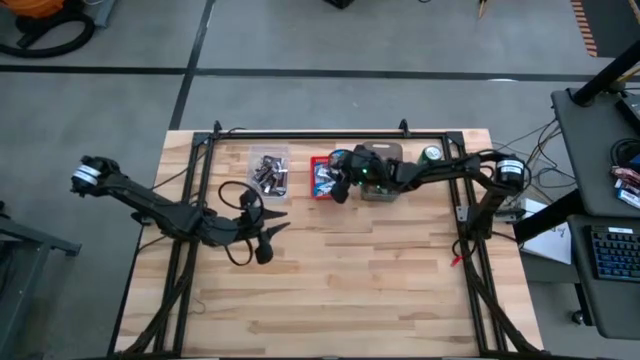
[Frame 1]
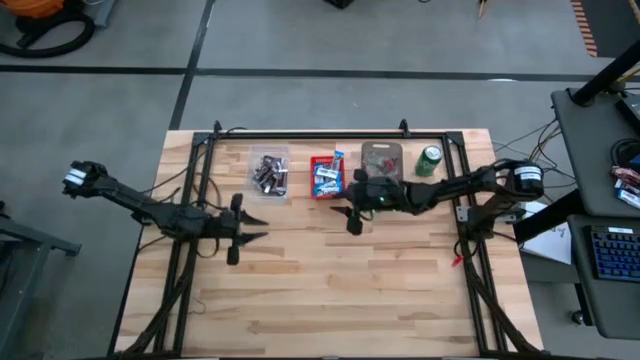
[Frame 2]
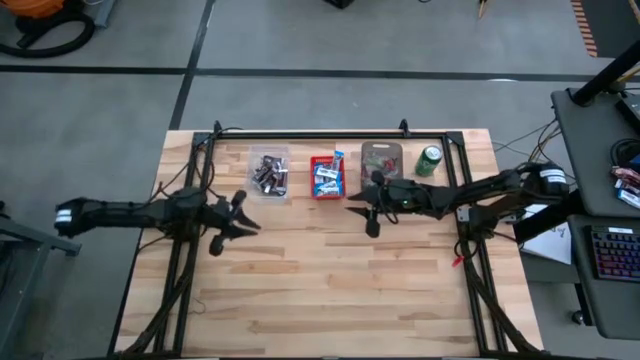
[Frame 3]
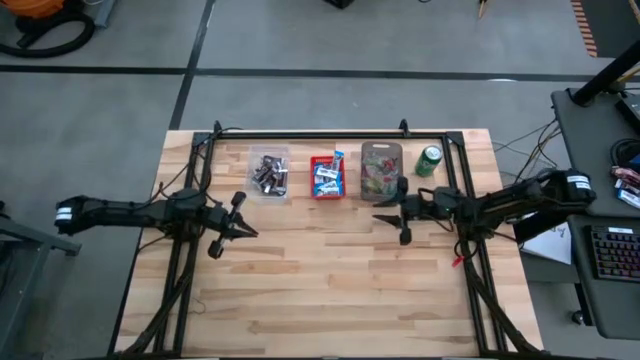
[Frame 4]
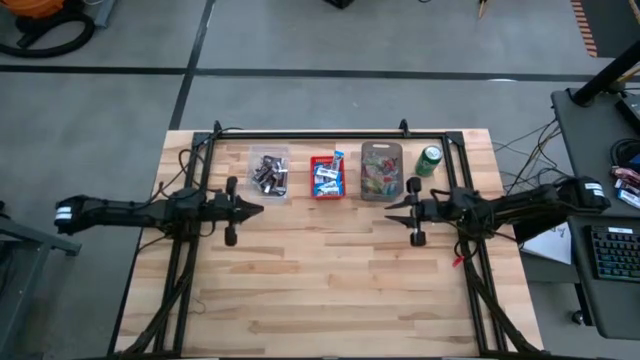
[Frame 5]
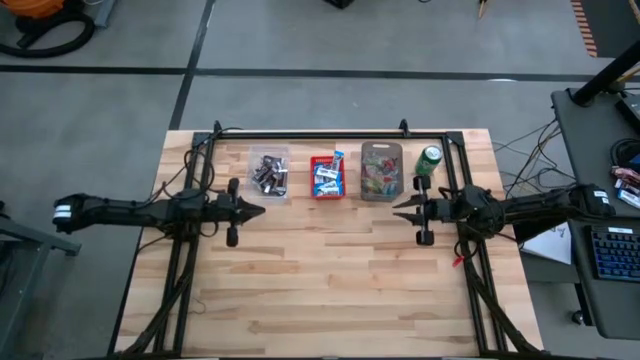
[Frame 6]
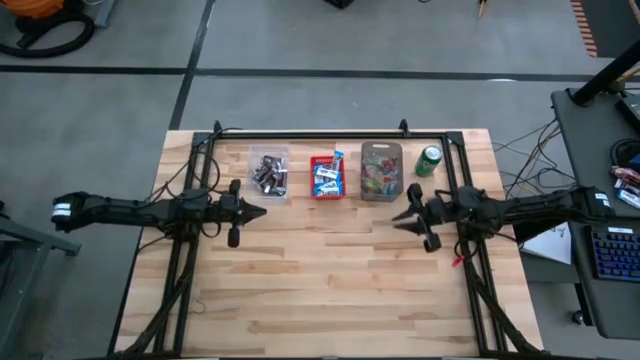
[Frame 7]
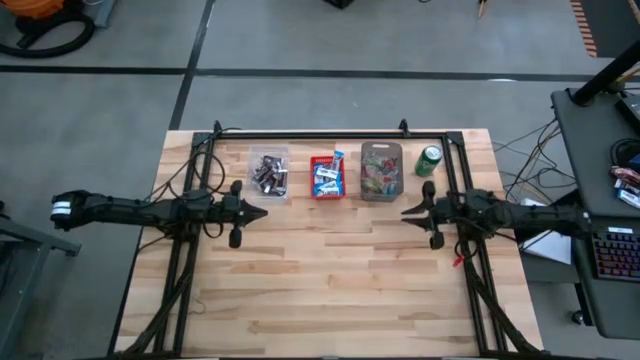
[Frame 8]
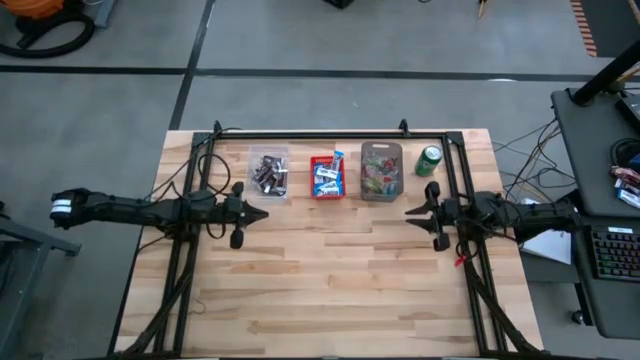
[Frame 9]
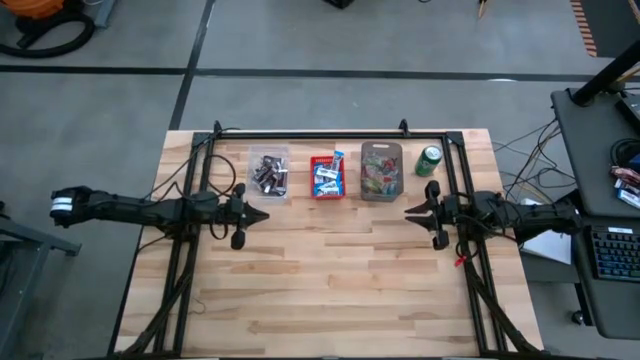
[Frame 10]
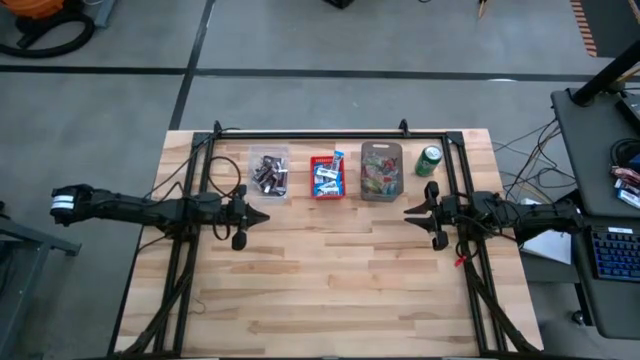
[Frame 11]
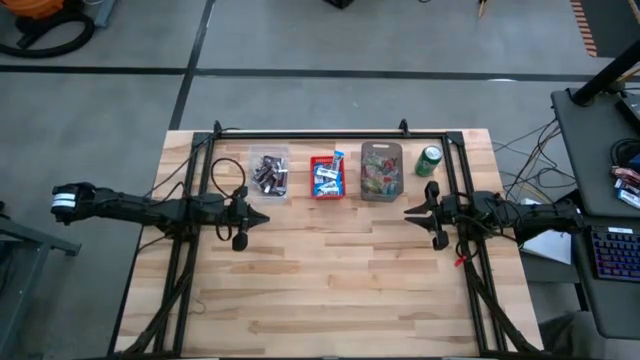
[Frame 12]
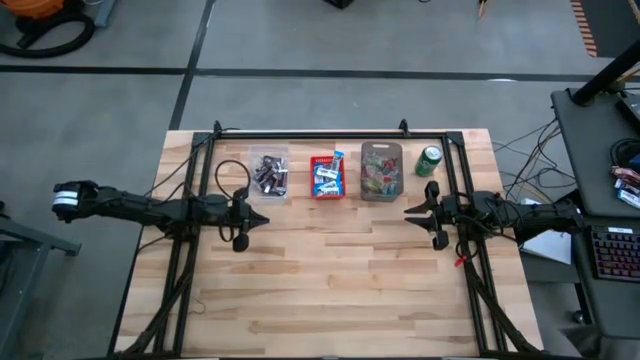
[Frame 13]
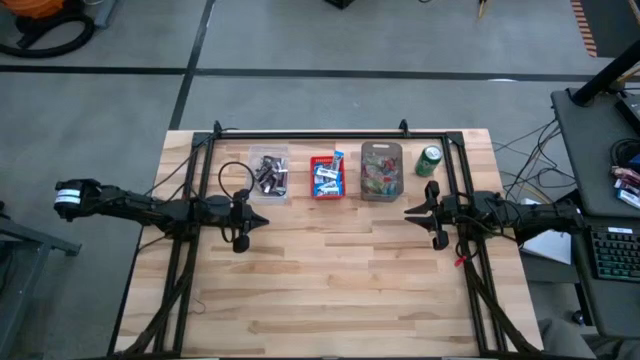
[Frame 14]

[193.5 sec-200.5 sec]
Task: Sort candy
Return to Home Position

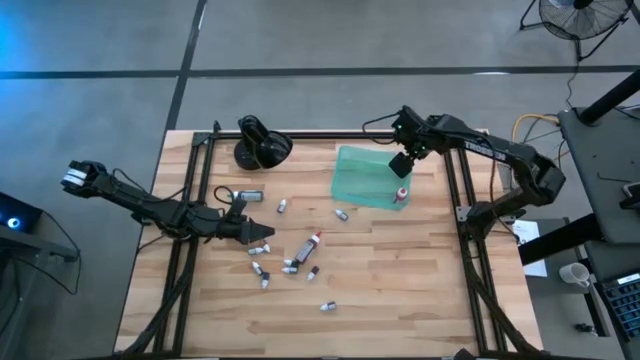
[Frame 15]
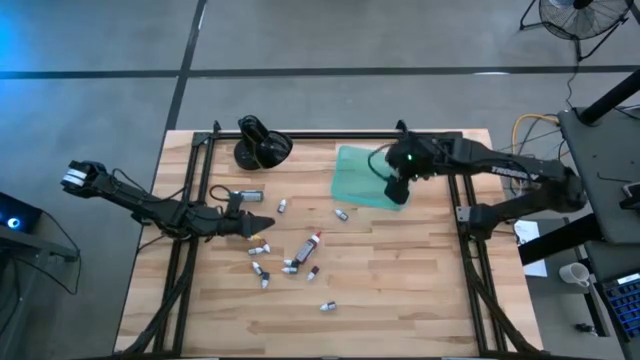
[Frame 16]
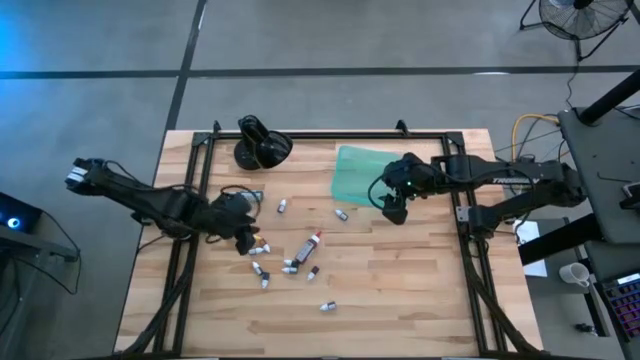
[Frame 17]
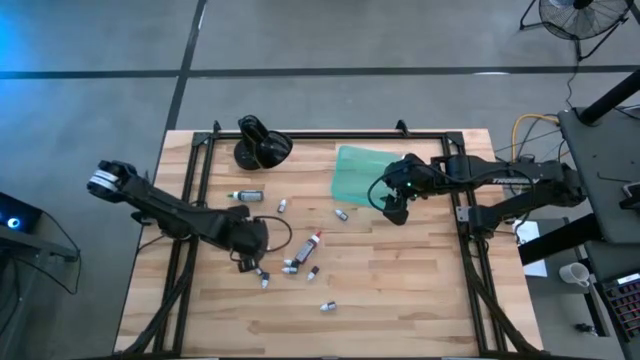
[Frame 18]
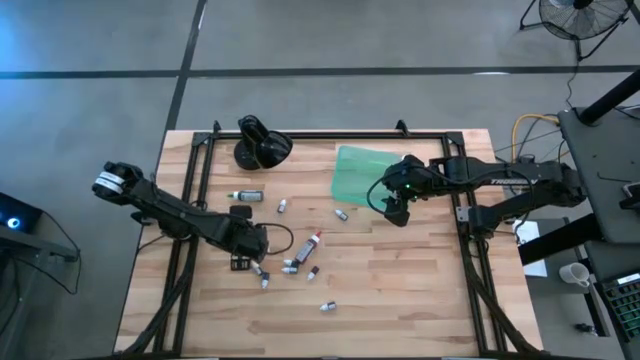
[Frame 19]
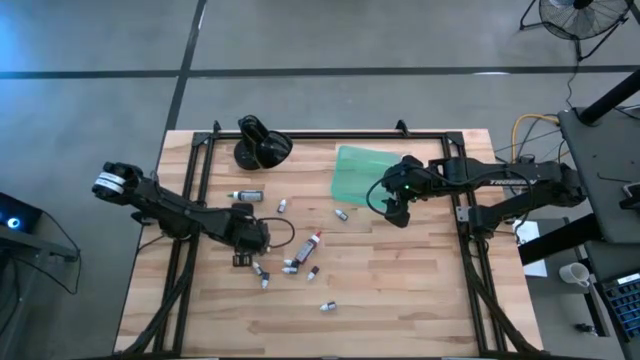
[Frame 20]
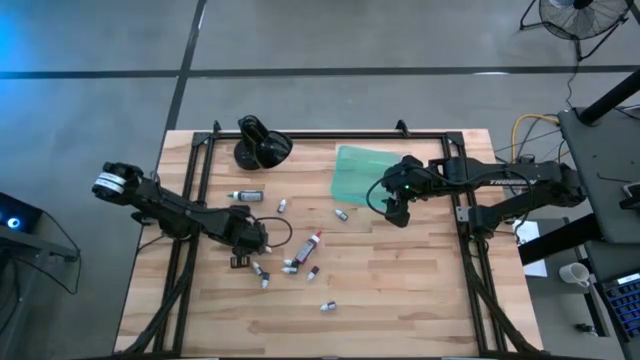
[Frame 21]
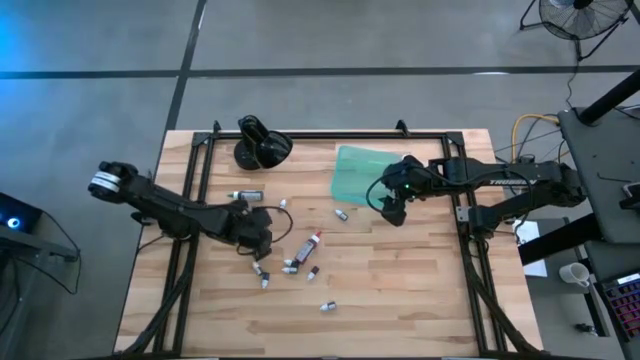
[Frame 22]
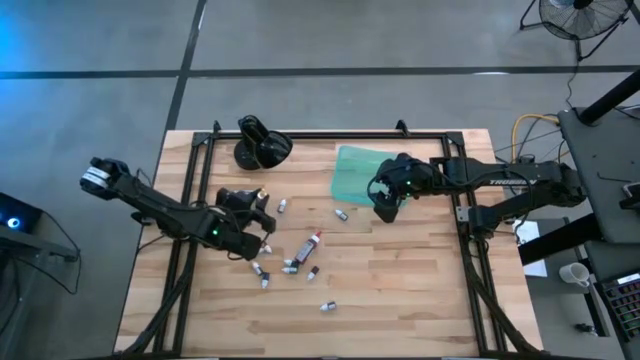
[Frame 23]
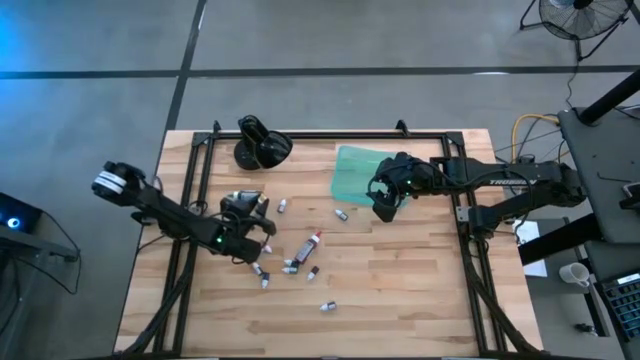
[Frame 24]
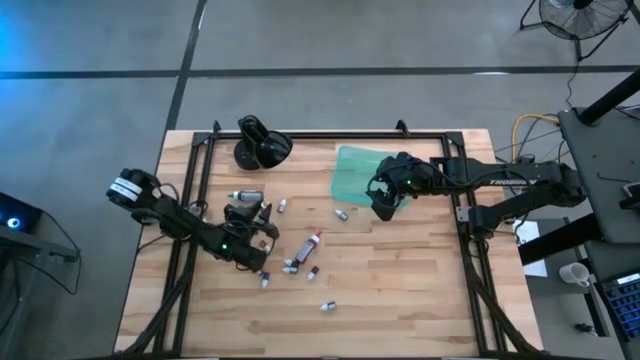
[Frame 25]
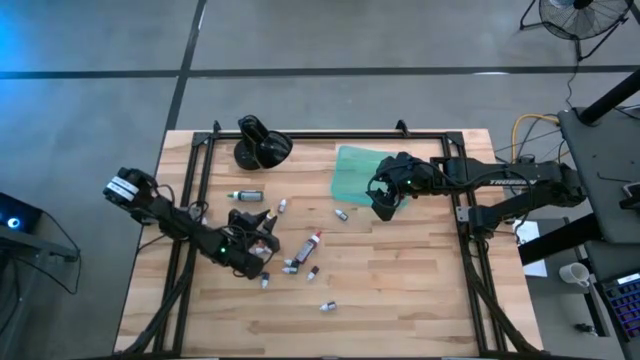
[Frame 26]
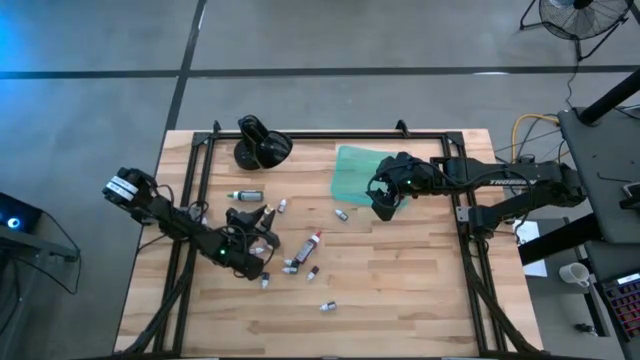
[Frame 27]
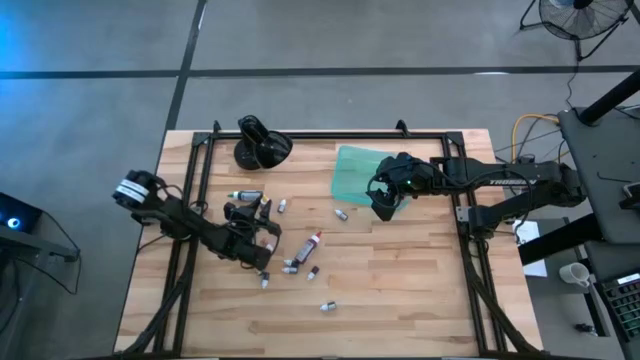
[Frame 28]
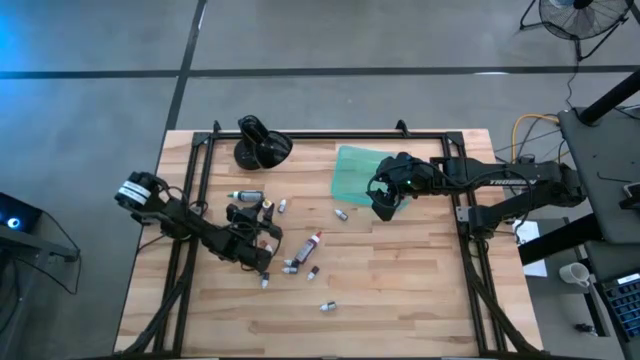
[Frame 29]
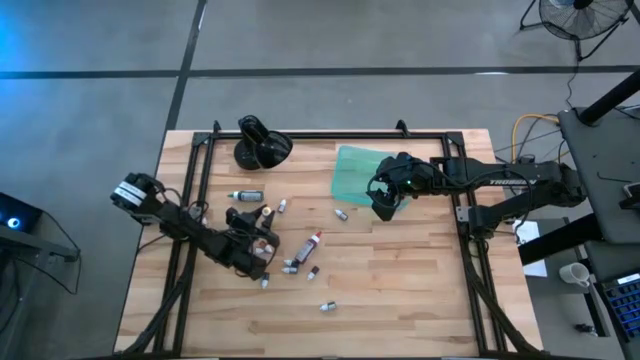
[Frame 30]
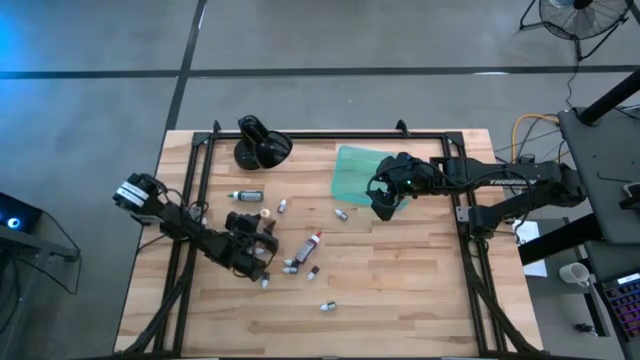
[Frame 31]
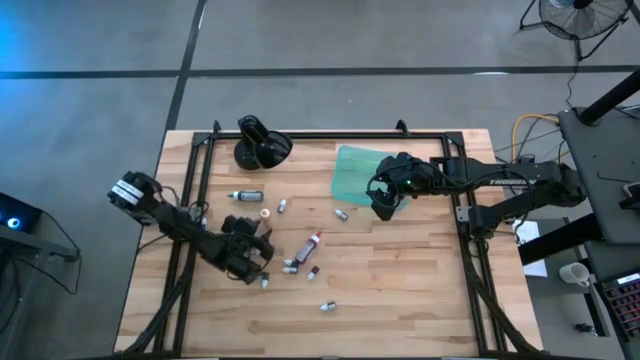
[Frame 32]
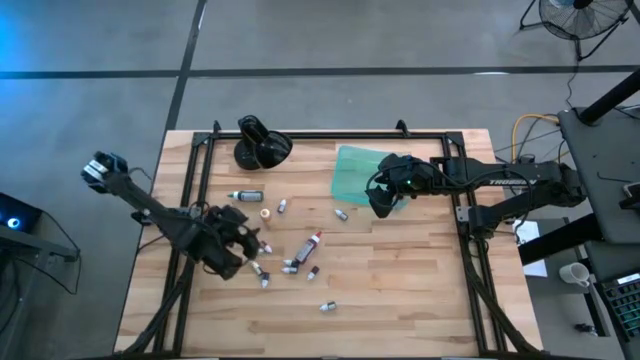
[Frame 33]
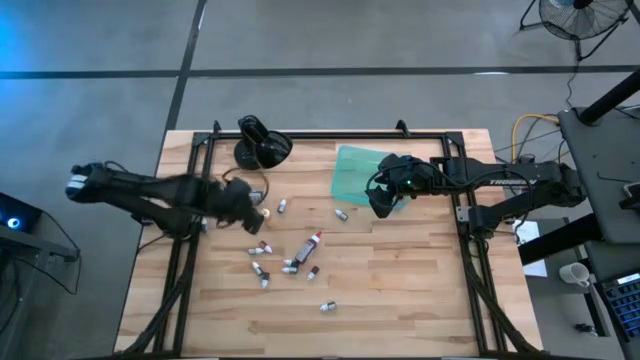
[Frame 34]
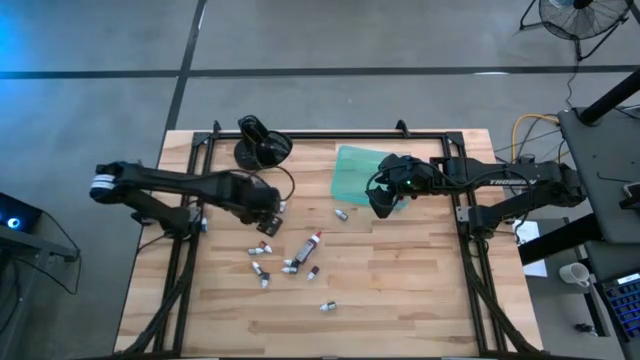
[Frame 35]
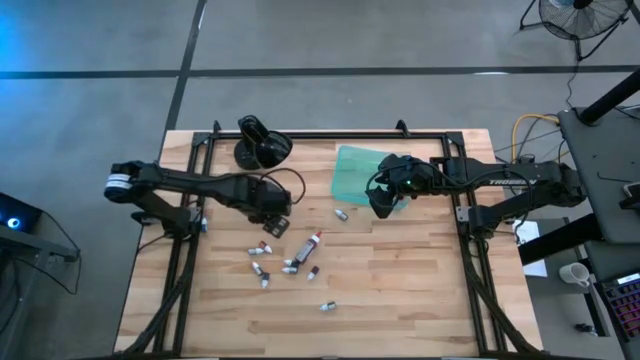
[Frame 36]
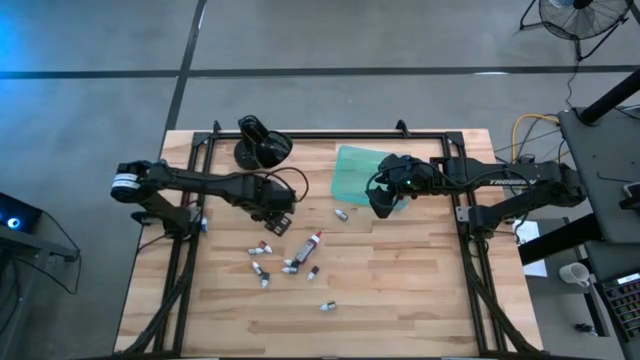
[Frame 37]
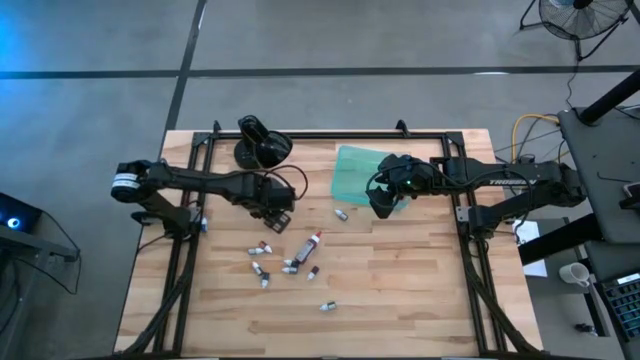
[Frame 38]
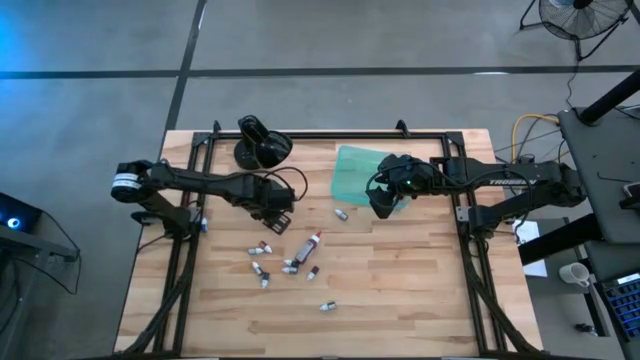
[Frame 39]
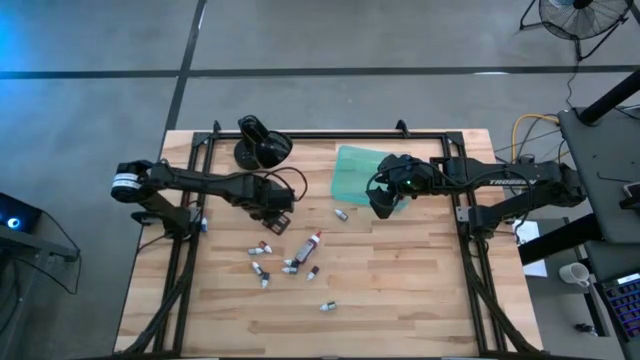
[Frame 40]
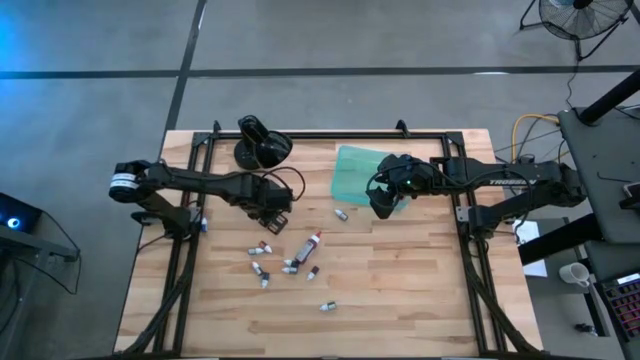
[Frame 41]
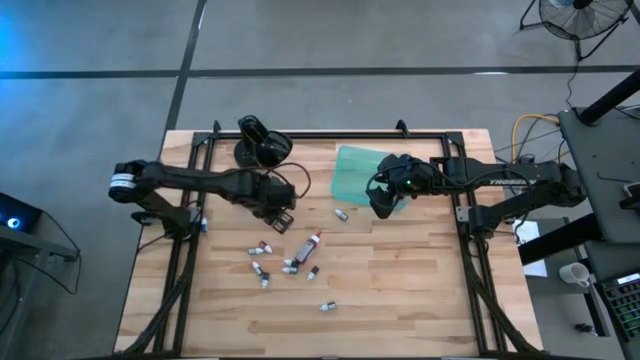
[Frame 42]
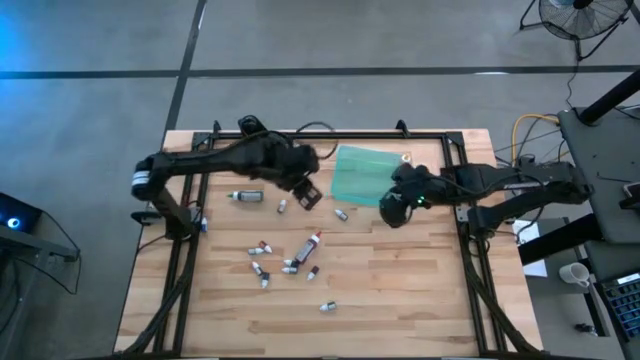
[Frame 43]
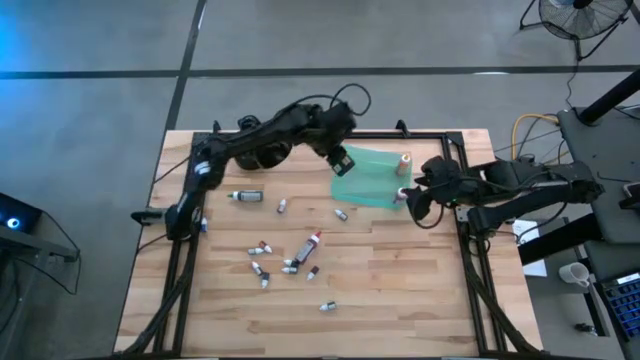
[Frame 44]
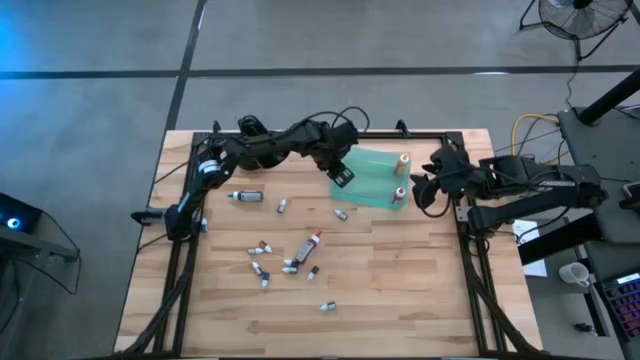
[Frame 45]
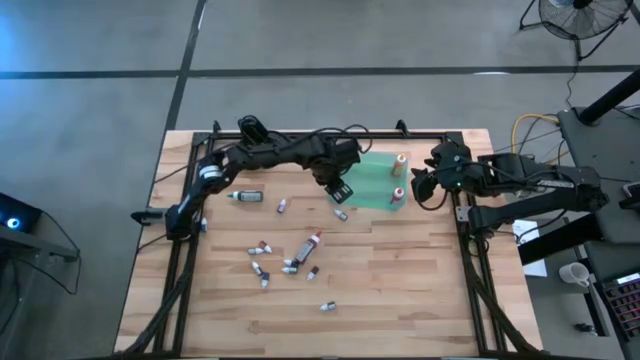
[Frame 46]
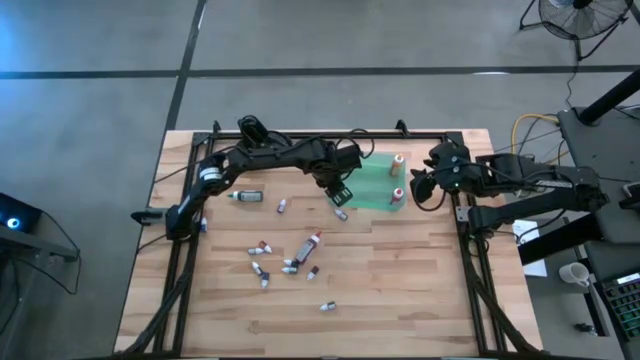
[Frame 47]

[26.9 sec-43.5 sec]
Task: Pick & Place food coloring
Put the large yellow food coloring bottle into the green bin
